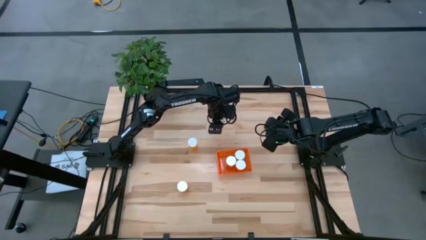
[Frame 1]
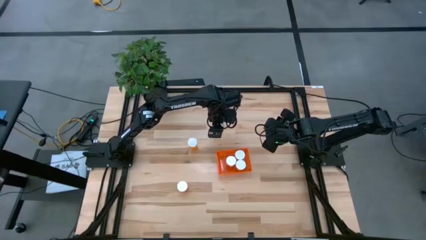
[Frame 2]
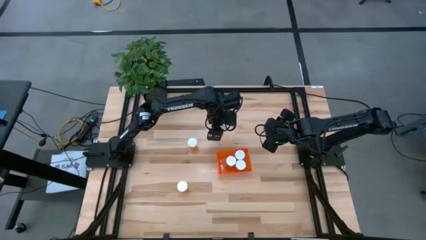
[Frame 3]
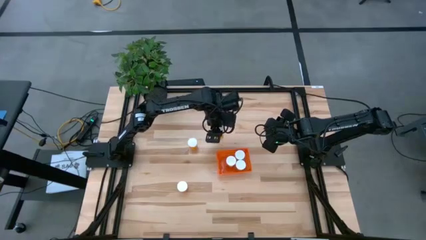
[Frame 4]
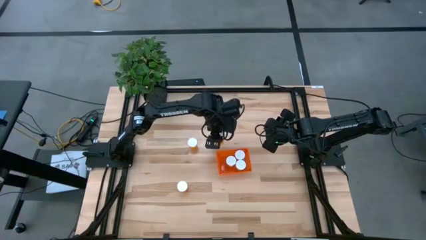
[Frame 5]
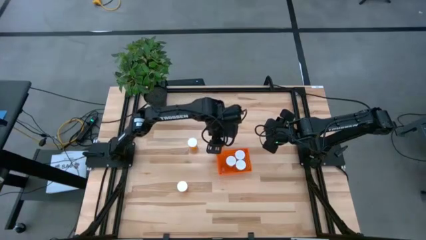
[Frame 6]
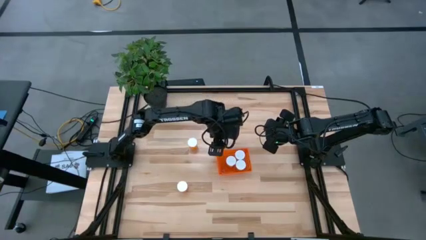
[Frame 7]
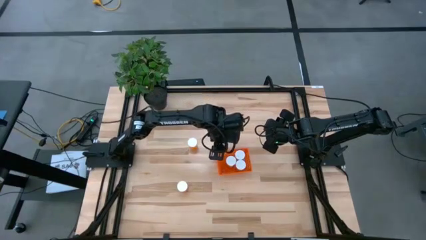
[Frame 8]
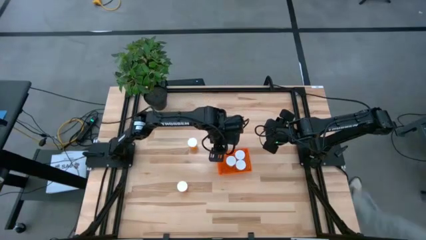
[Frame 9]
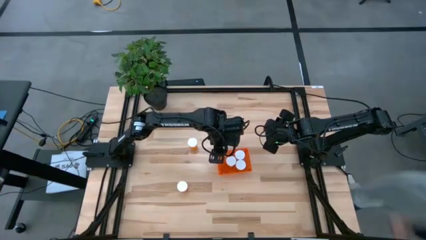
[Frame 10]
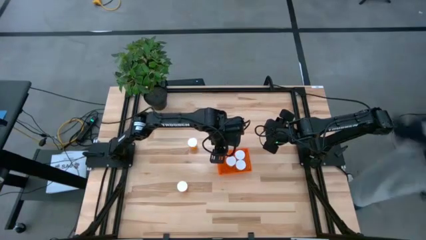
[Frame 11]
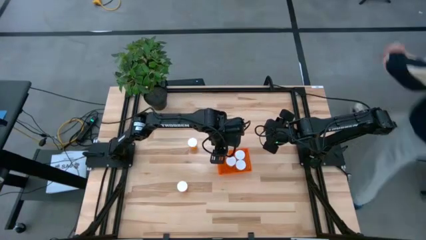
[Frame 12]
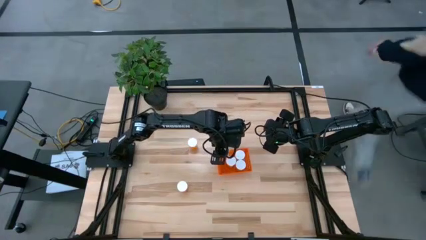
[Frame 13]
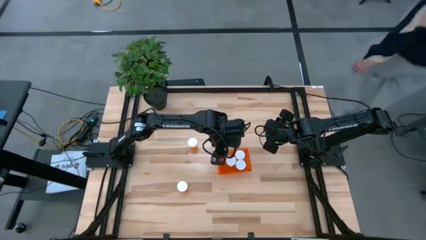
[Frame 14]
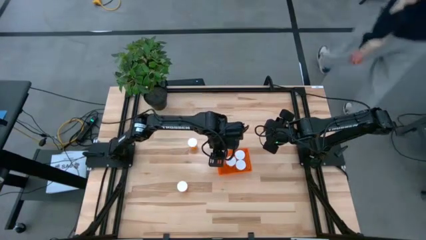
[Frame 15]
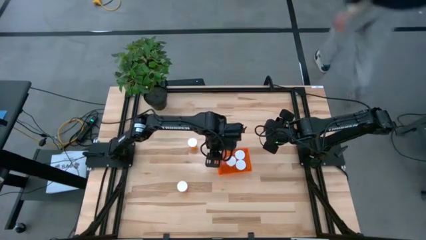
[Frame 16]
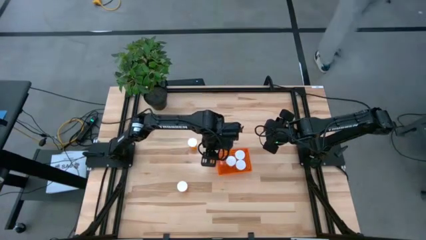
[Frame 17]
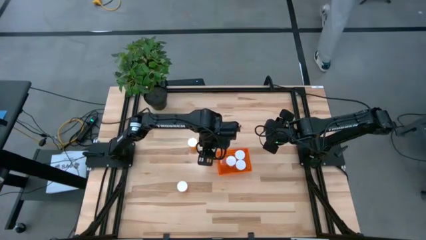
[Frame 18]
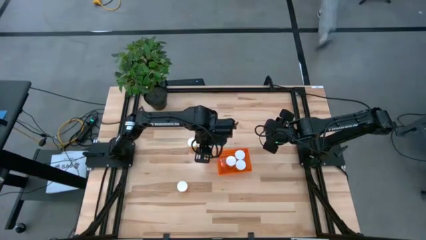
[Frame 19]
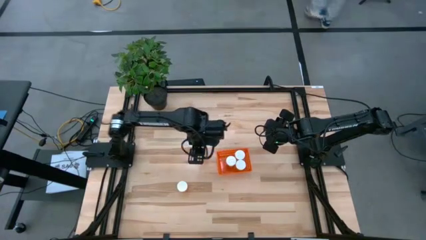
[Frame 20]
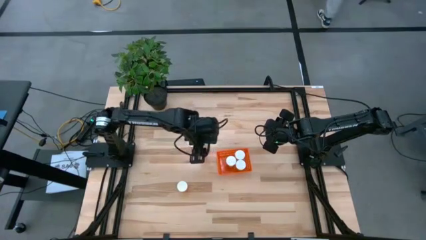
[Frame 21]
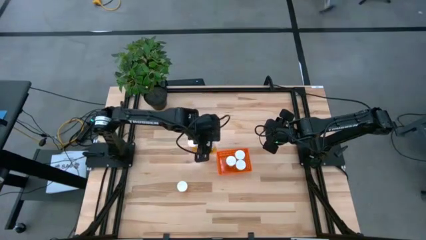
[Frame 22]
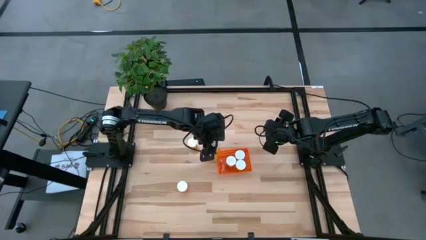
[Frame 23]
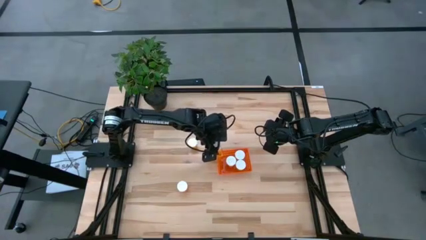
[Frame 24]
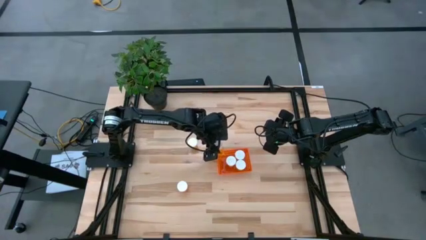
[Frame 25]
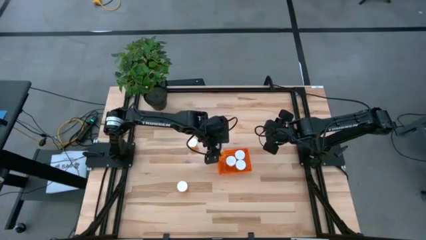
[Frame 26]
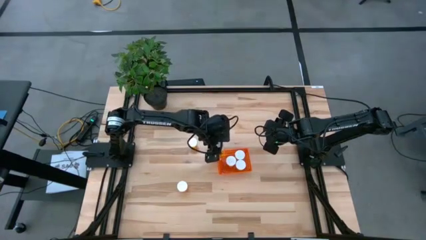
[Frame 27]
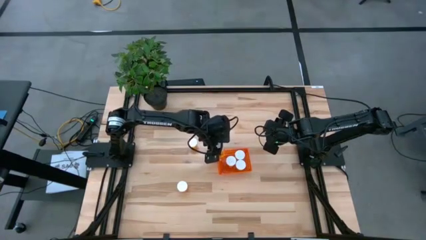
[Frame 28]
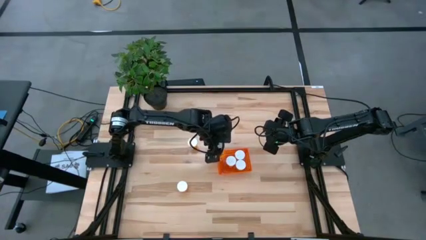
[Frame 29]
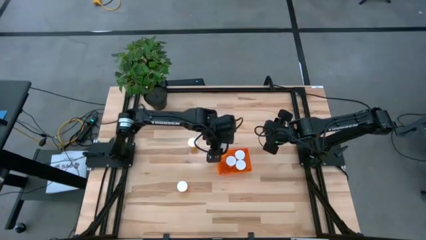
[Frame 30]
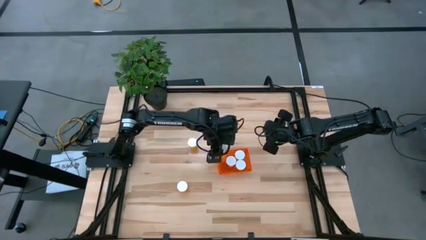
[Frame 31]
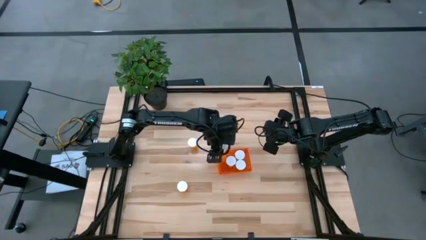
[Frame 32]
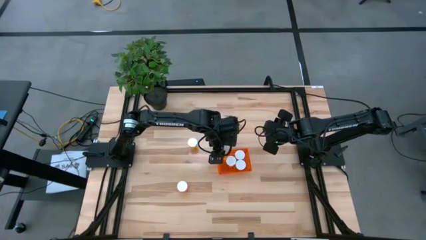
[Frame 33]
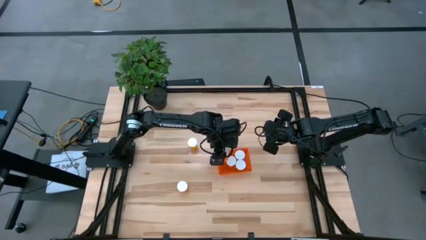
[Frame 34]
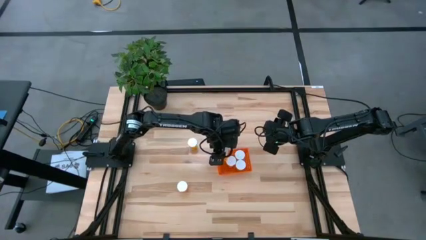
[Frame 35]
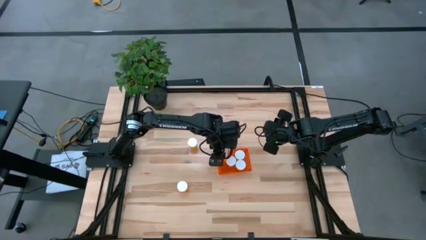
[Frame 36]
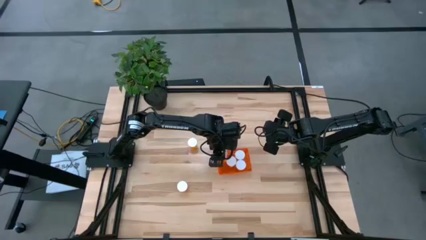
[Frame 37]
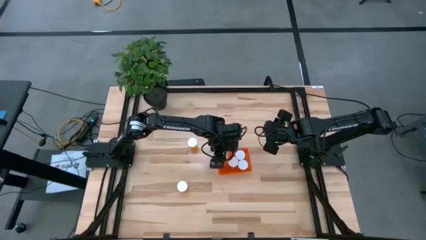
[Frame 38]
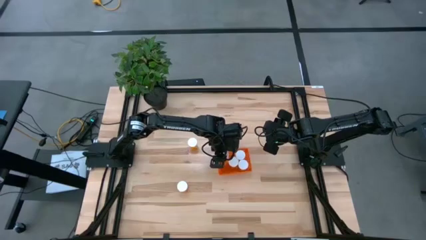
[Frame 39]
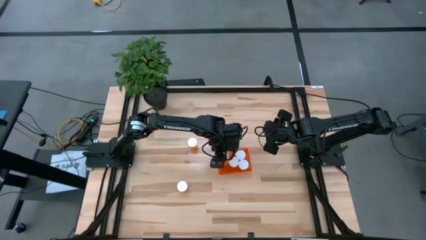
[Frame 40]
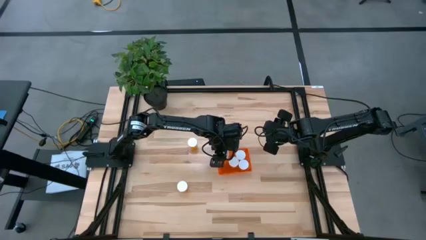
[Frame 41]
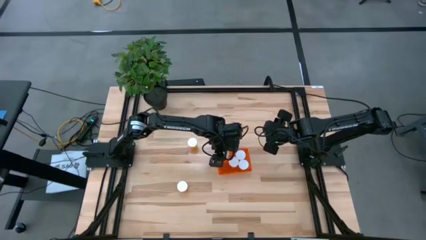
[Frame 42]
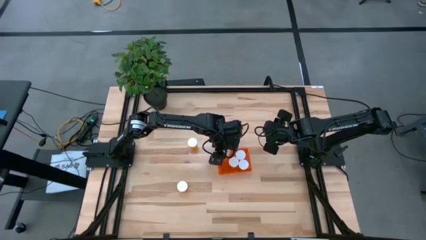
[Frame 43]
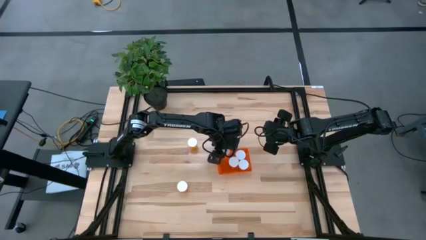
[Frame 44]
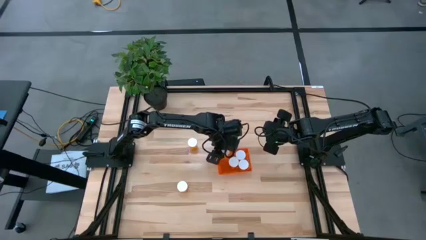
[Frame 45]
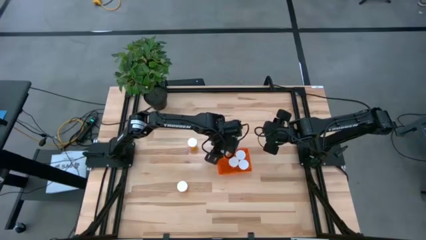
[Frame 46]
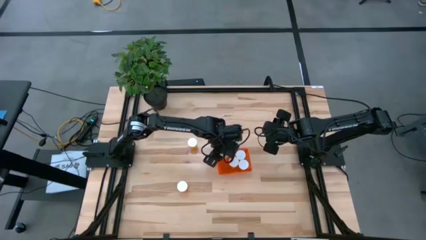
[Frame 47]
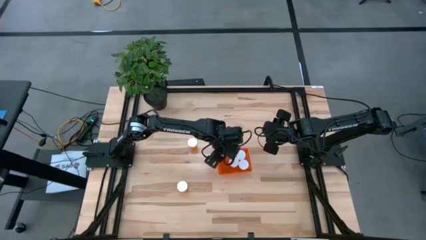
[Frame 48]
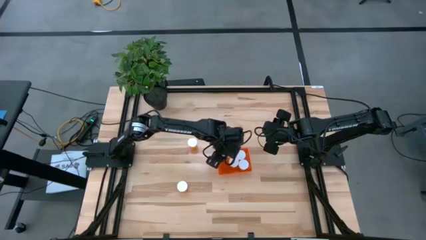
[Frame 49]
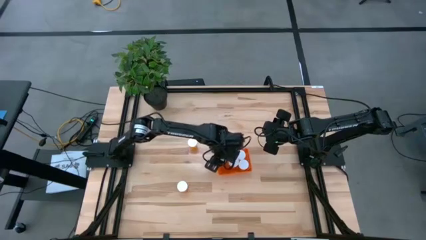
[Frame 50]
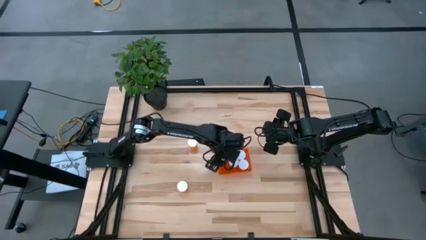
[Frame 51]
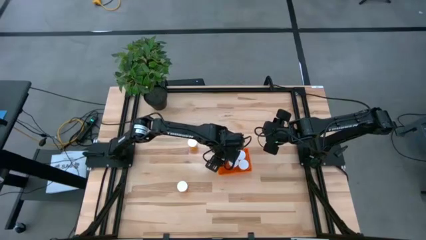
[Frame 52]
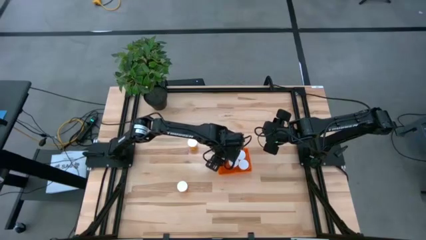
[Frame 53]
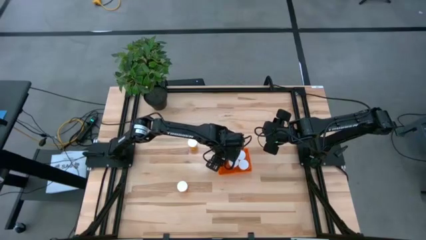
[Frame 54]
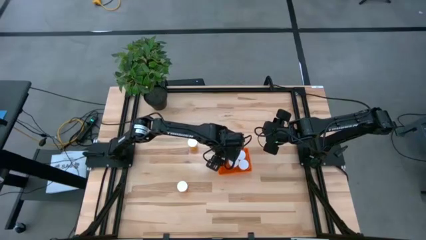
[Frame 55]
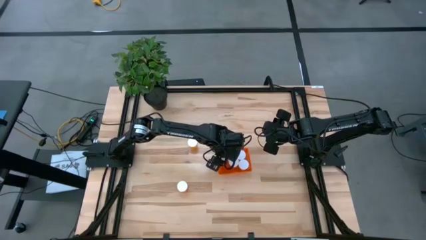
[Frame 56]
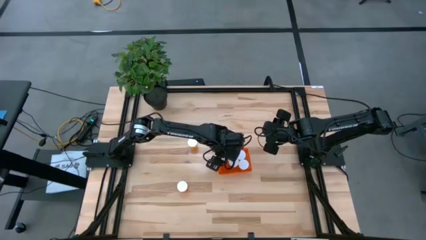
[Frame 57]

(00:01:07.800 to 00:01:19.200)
Task: Pick and place pill bottles into a basket
Put the orange pill bottle into the orange bin

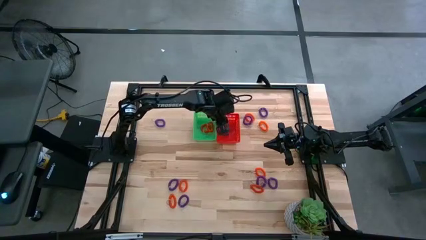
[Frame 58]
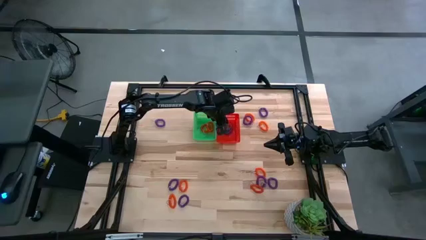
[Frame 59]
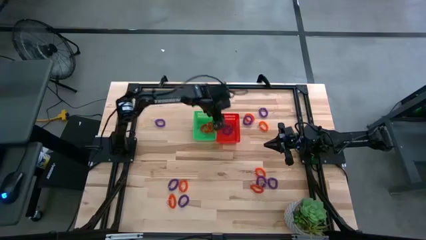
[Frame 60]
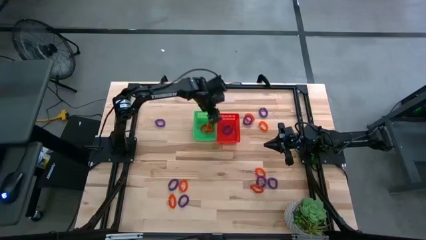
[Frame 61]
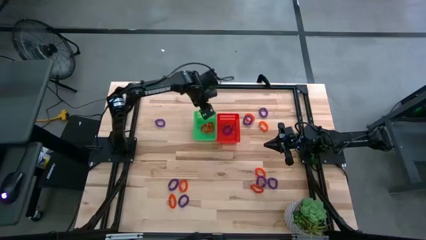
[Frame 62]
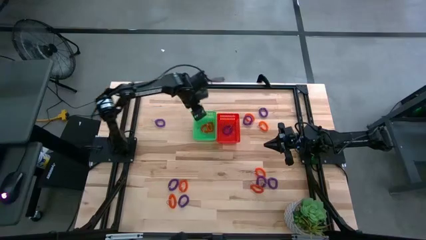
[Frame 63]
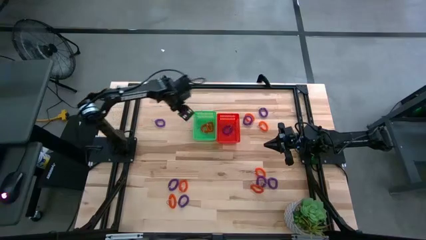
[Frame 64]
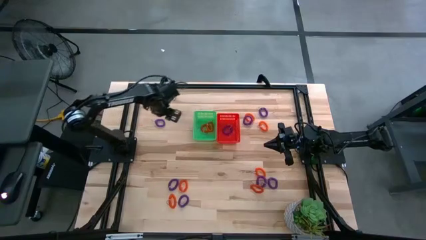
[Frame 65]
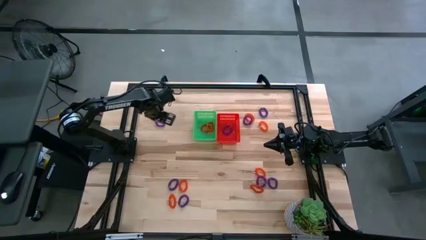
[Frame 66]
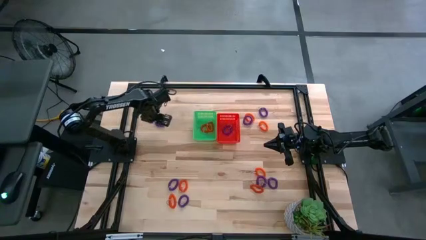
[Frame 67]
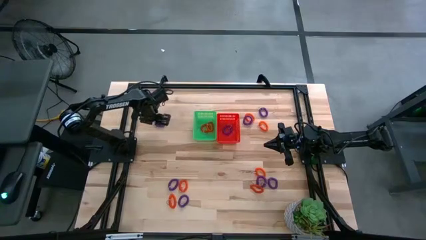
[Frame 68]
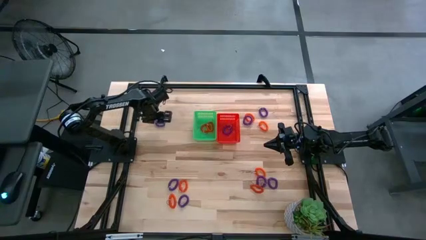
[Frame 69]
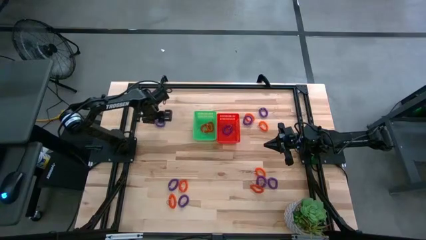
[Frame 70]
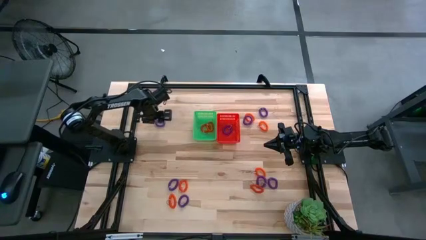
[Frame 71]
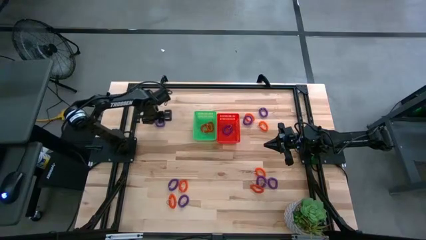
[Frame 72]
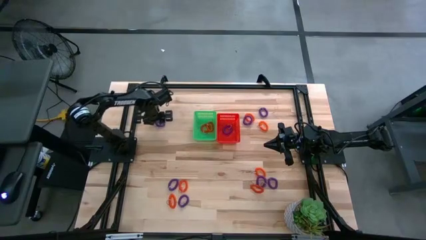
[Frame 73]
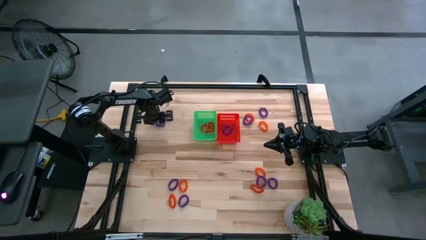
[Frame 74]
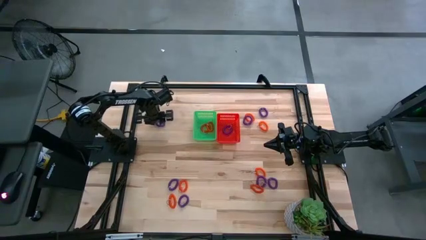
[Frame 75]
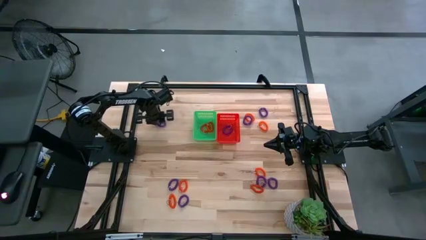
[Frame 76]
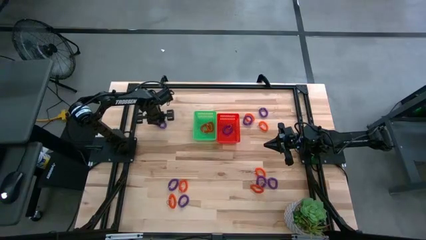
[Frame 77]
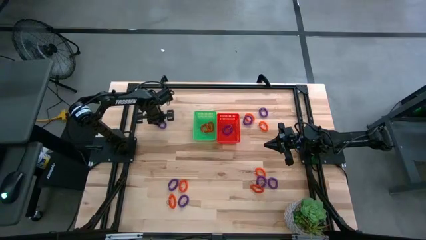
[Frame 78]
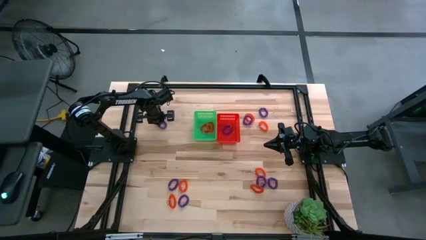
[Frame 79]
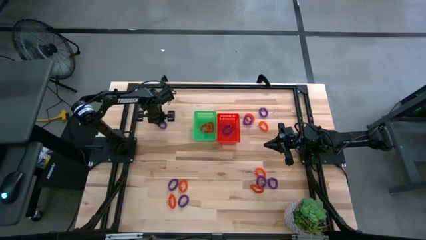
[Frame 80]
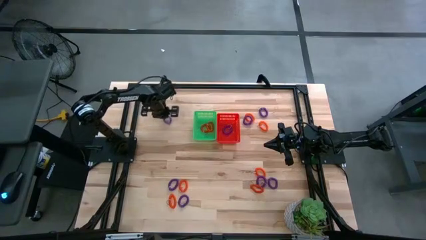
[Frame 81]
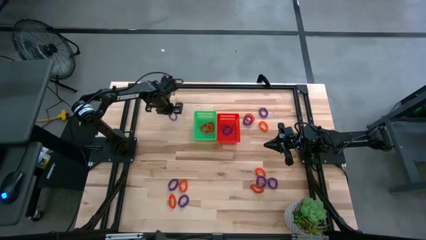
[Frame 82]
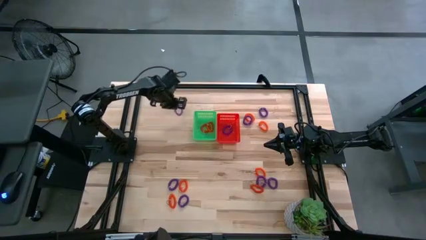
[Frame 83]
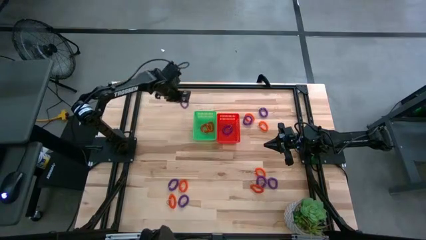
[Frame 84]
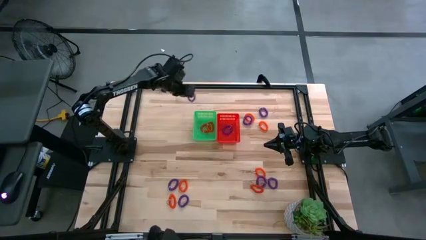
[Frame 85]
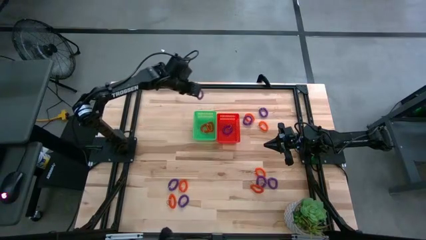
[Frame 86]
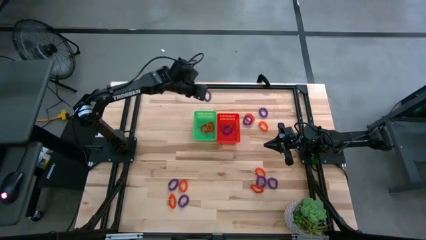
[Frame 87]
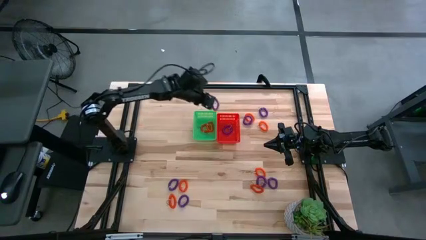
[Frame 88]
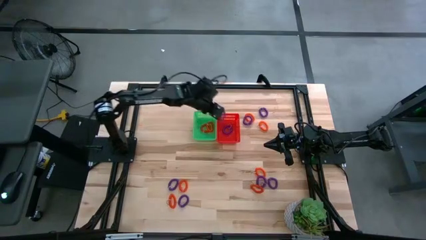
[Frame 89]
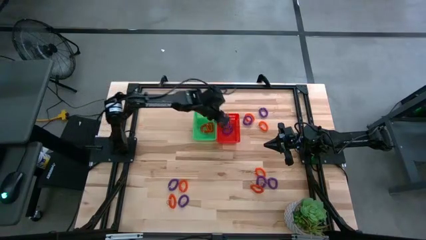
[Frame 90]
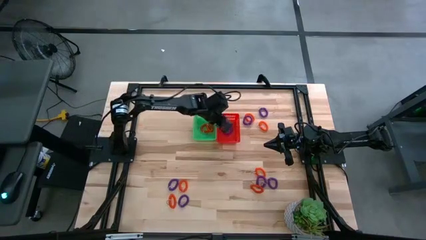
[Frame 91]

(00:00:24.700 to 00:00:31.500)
Task: Sort spring keychains
Put the purple spring keychain into the orange bin
